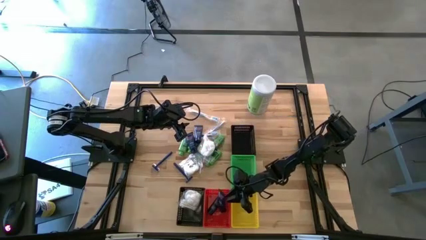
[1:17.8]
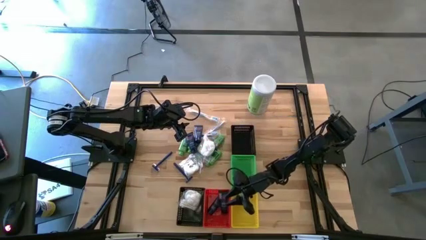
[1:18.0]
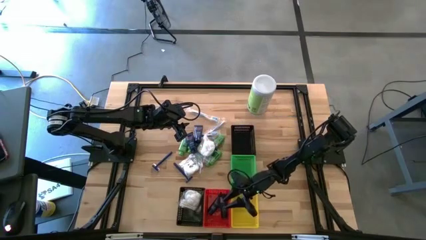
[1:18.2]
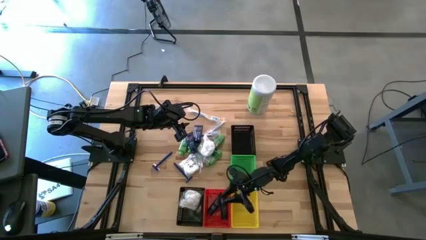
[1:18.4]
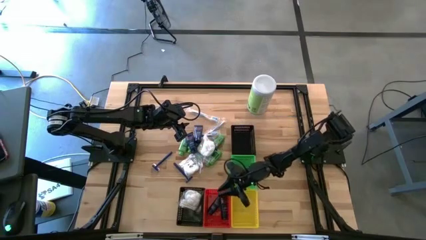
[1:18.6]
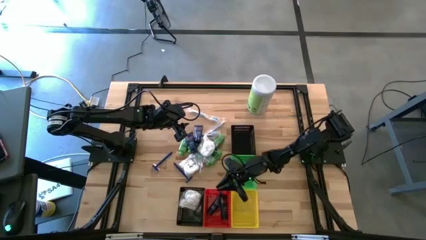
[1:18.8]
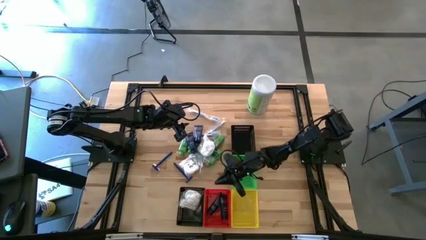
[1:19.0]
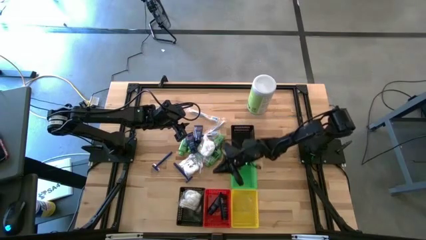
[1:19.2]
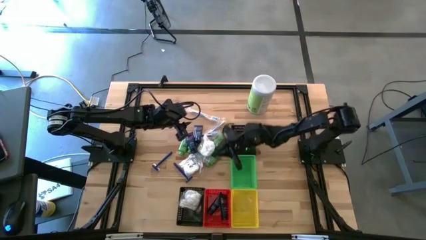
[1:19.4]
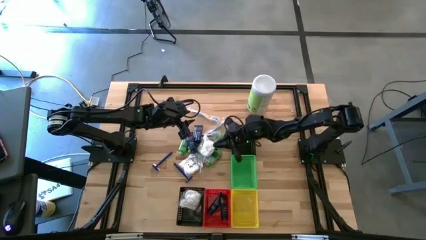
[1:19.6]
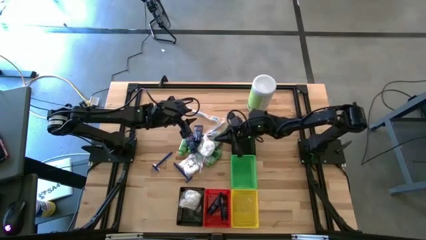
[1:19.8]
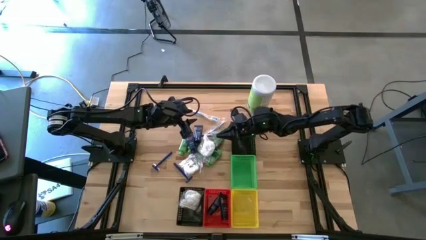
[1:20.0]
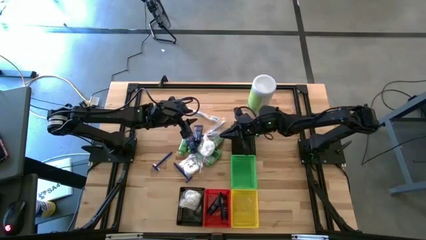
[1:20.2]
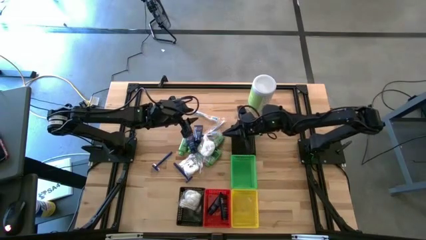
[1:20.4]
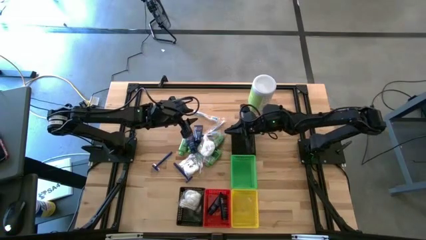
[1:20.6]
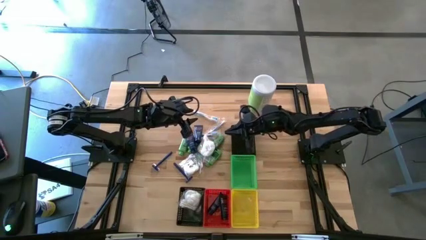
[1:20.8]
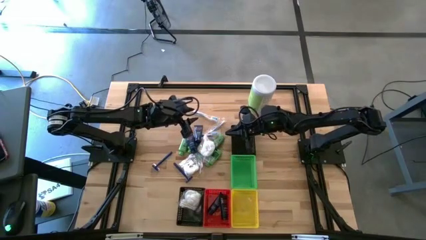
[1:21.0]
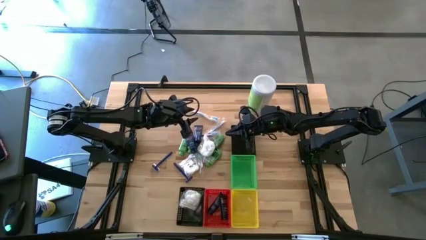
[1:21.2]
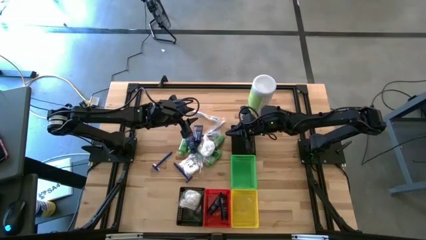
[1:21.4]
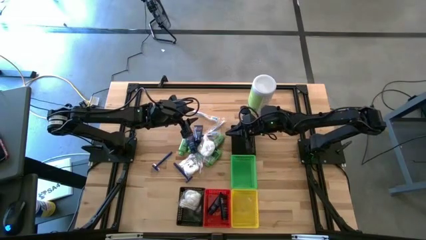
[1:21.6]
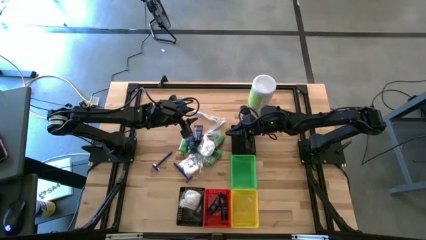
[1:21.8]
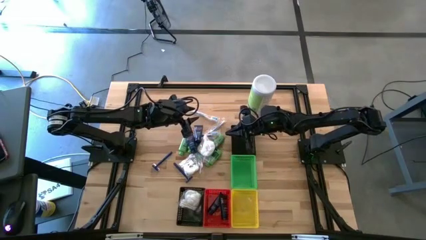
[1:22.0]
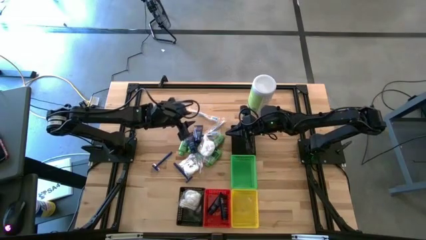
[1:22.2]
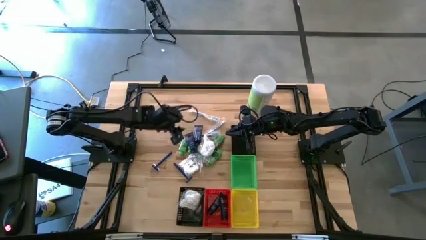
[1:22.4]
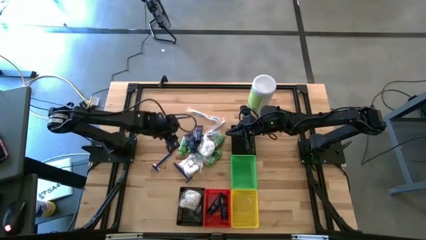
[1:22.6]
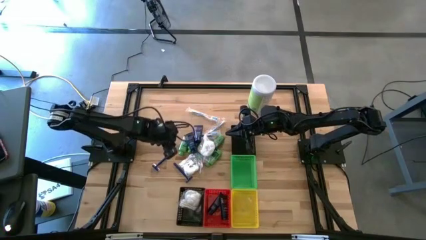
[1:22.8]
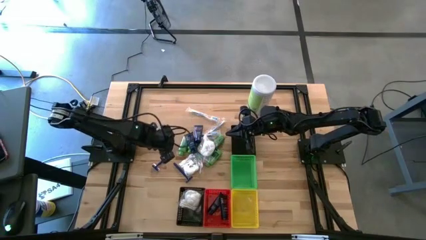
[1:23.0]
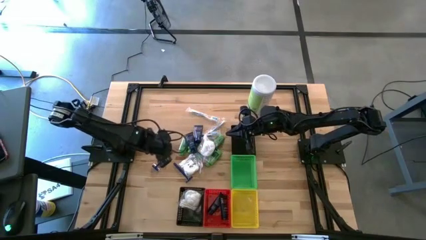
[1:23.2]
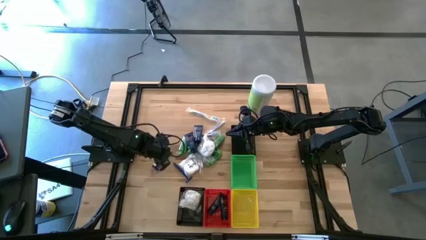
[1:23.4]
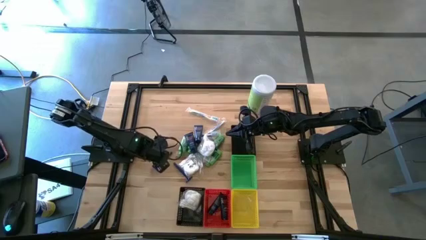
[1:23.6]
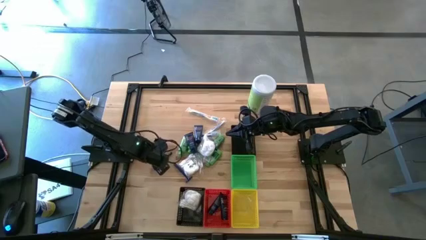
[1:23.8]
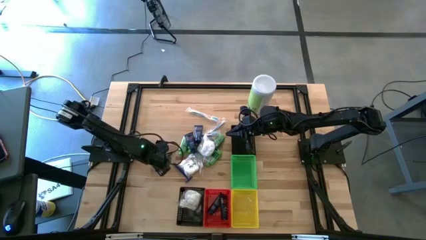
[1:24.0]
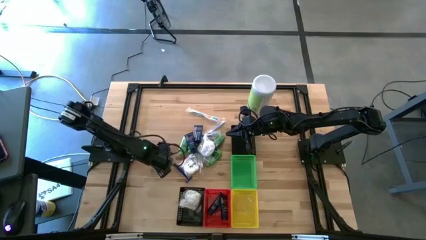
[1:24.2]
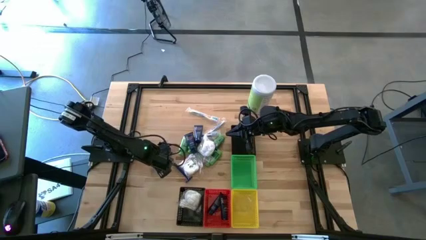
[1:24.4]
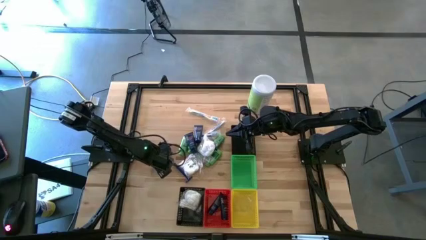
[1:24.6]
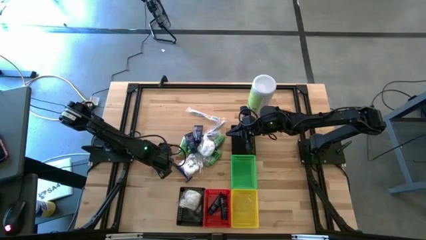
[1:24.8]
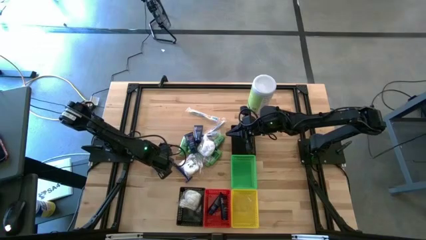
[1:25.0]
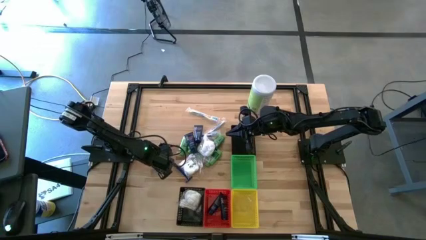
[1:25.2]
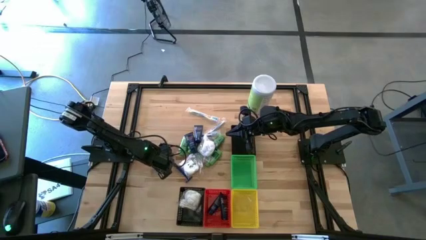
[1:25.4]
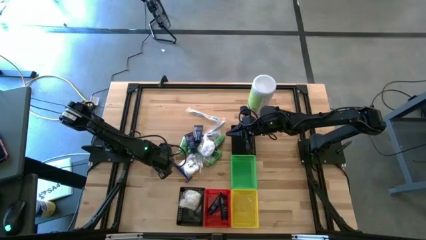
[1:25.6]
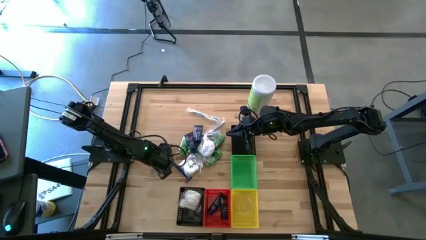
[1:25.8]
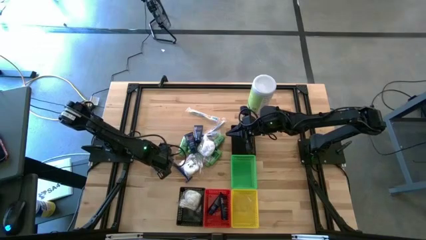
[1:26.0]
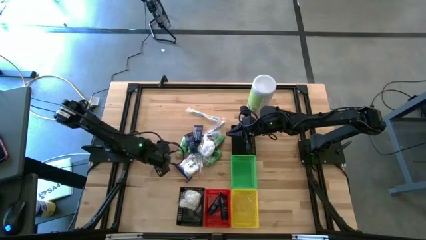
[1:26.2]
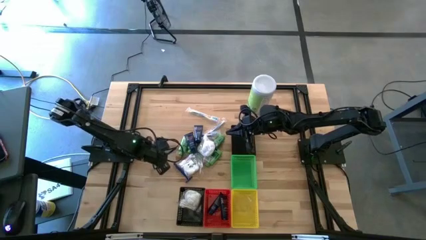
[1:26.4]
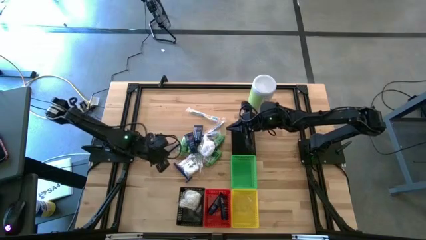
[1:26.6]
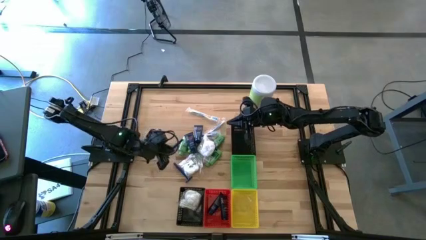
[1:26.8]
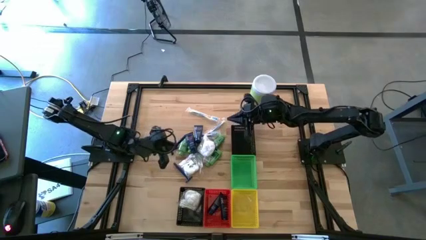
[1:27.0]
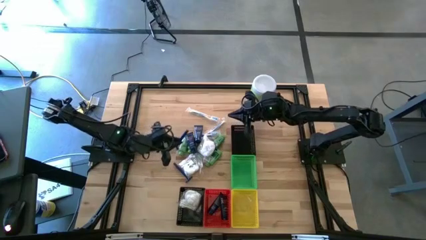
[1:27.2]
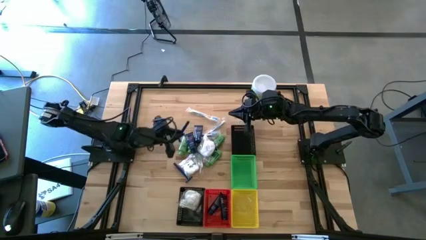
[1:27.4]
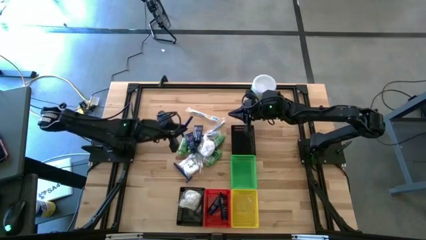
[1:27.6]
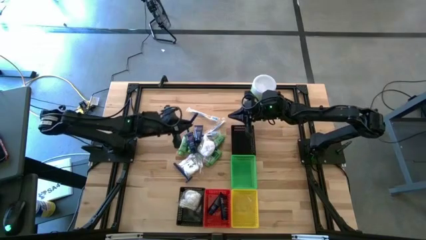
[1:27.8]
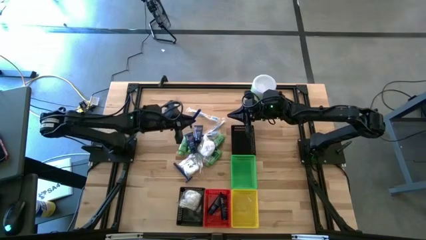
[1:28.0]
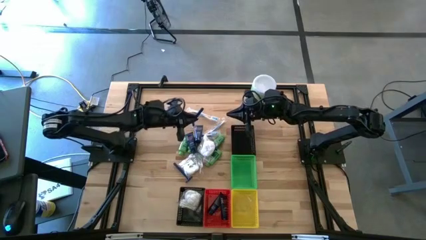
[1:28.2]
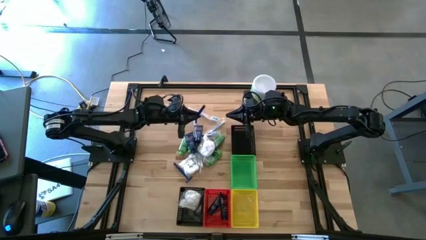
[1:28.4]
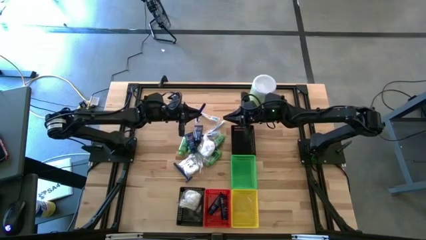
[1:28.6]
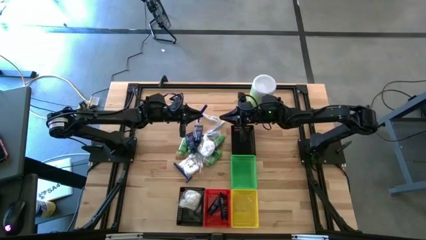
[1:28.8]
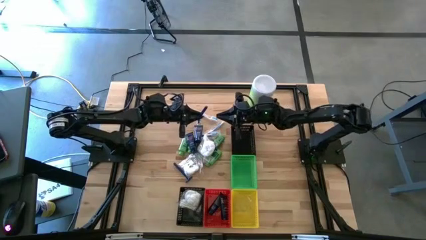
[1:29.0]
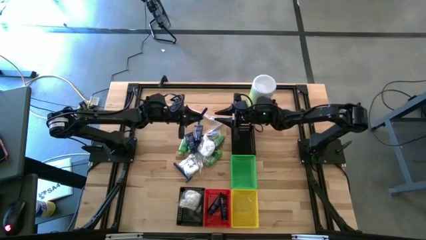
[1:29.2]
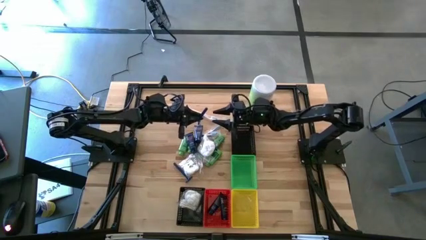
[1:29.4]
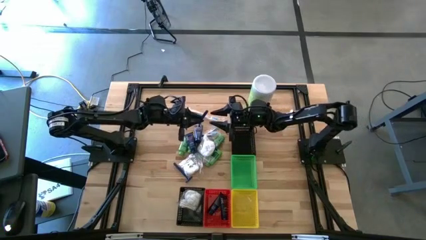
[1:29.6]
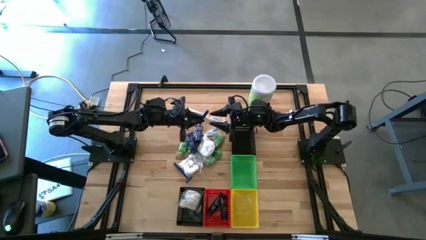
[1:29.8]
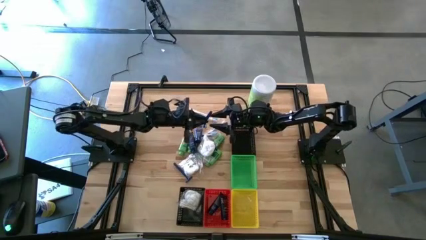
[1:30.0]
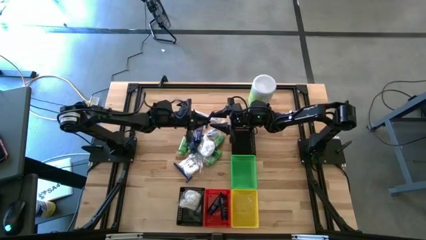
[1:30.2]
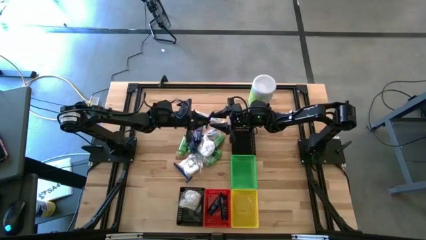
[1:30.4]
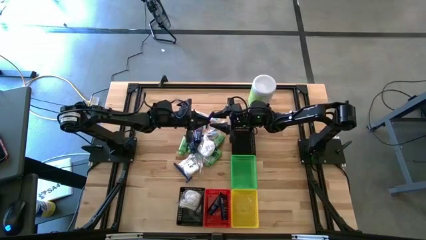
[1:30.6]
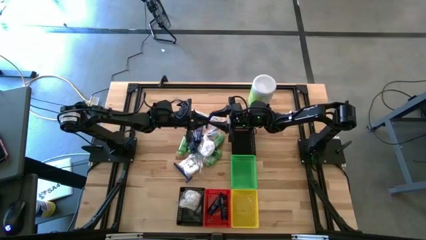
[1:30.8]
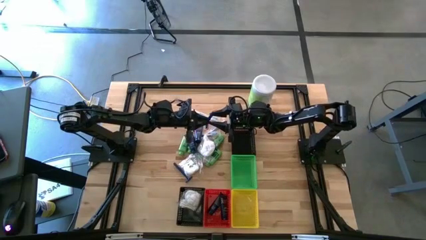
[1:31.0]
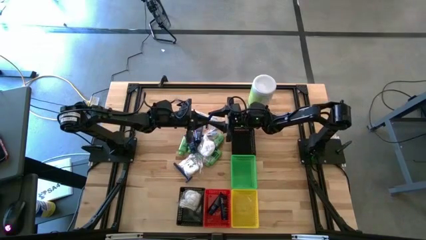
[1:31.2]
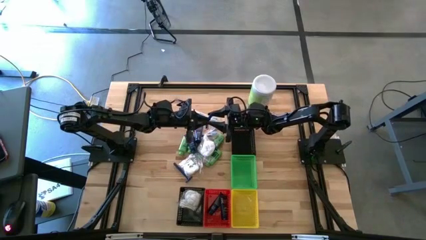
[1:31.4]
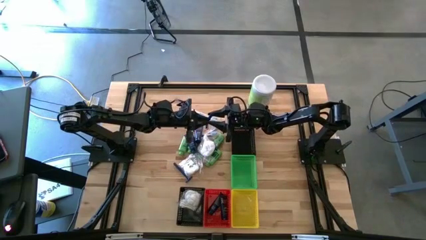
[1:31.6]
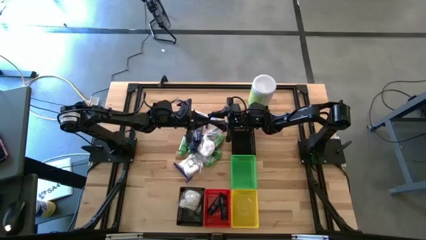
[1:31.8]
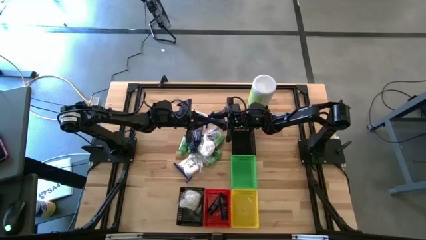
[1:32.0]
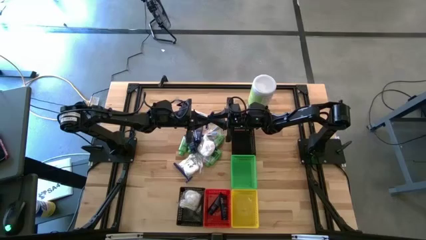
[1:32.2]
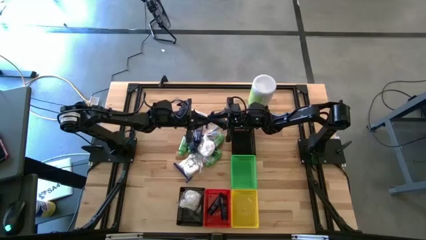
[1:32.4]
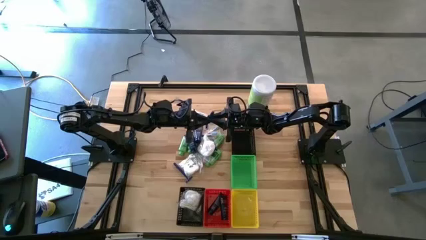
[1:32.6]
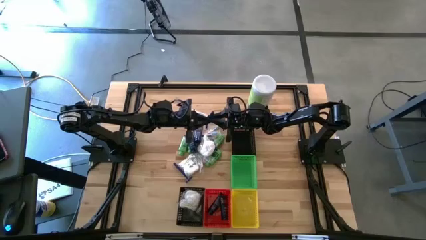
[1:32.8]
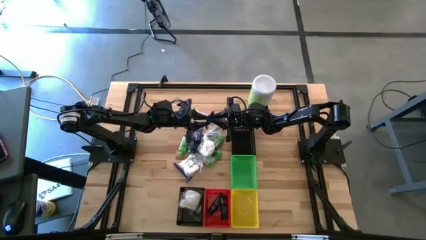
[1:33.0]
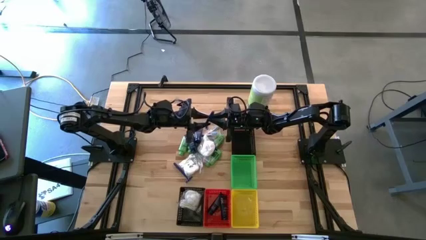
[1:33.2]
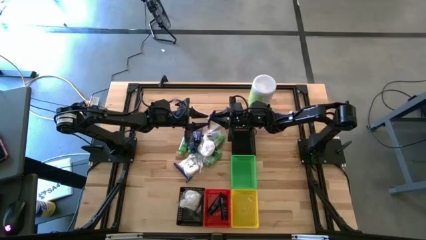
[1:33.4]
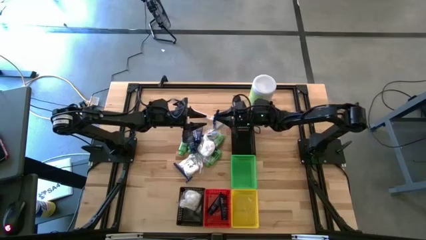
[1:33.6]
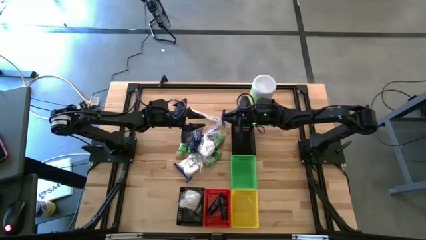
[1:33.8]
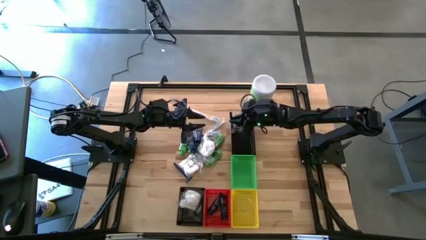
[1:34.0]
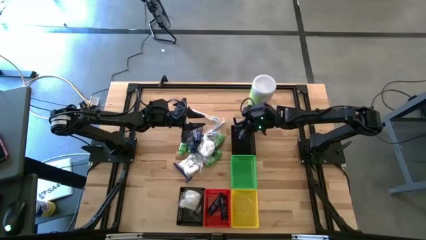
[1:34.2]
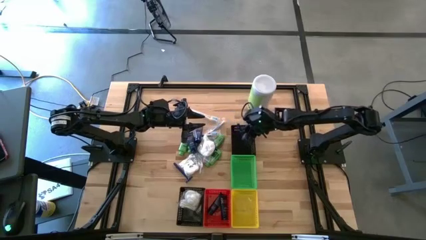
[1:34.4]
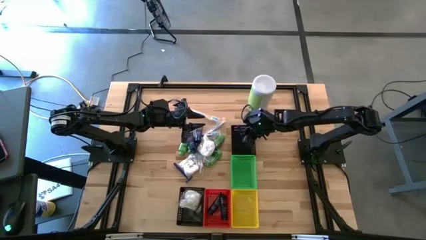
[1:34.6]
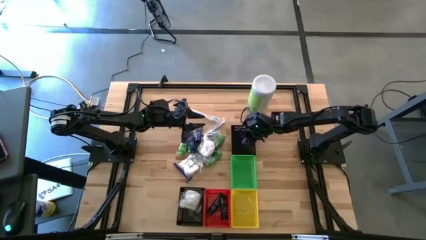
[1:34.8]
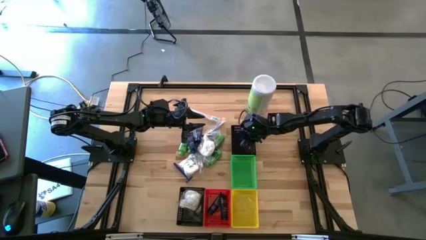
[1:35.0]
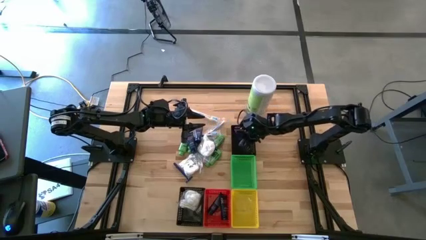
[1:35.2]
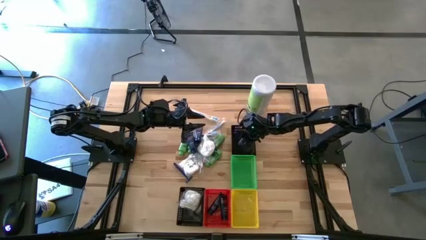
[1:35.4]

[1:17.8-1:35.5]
Task: Pick & Place Travel size toiletries
Put the blue razor into the top black bin
